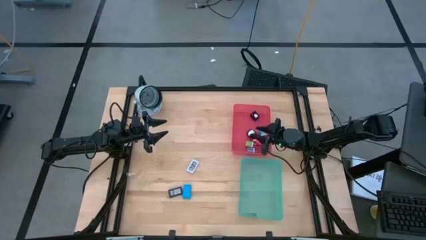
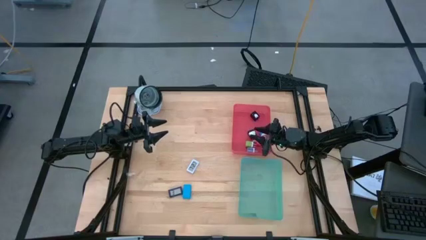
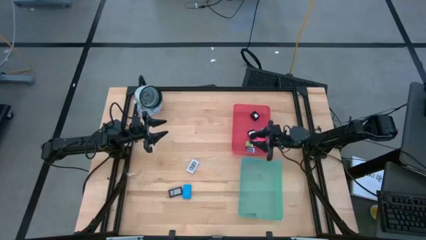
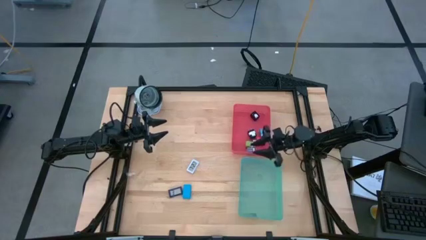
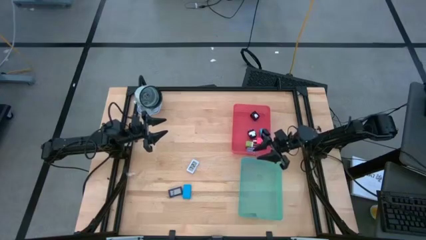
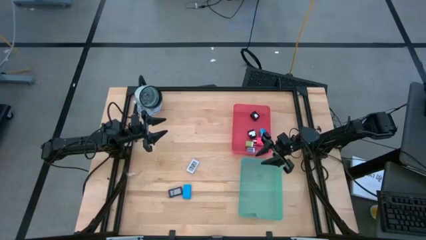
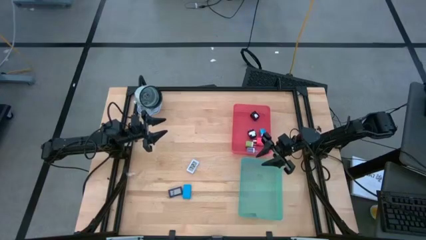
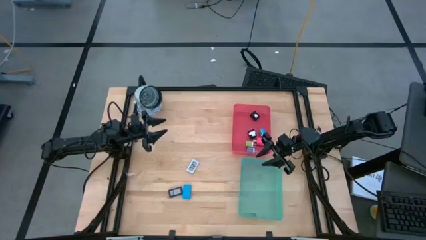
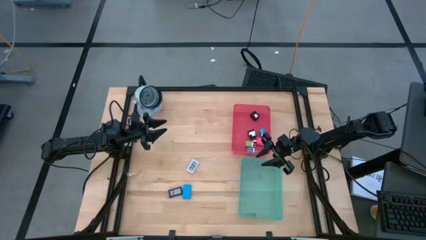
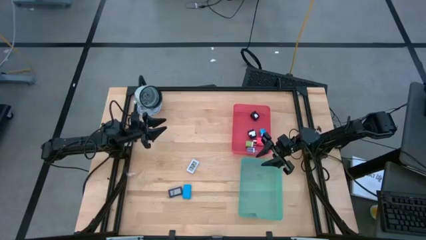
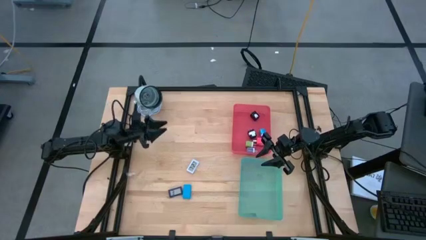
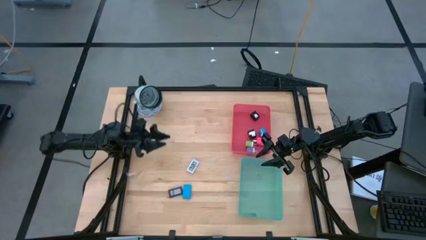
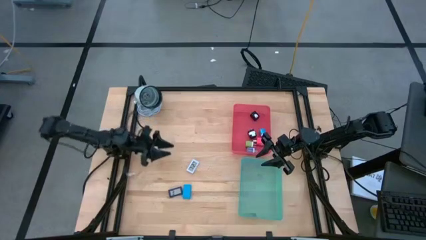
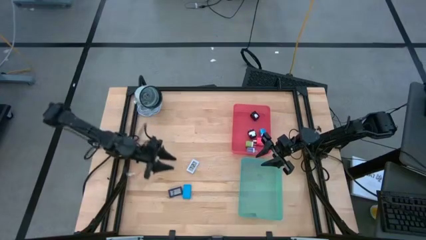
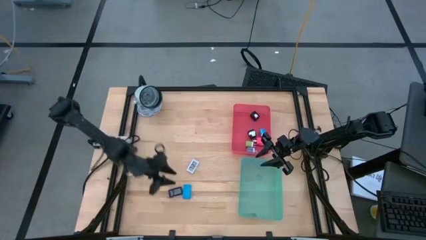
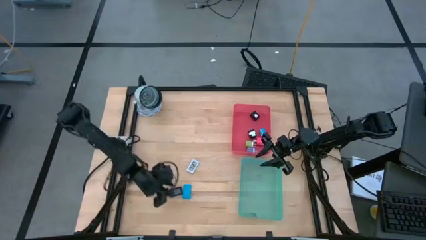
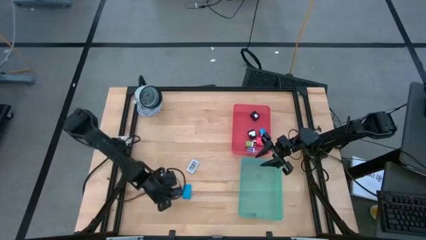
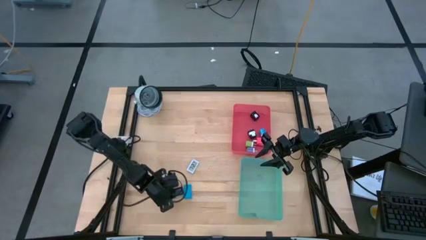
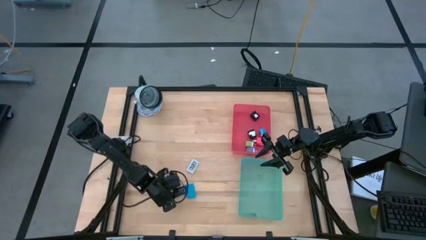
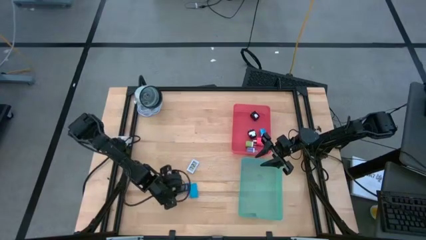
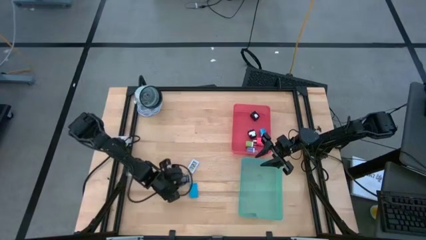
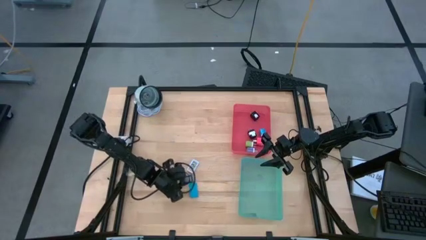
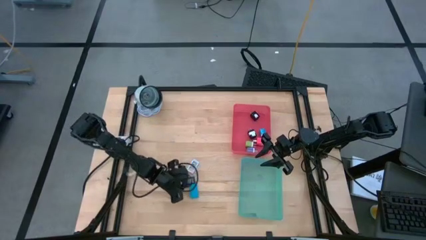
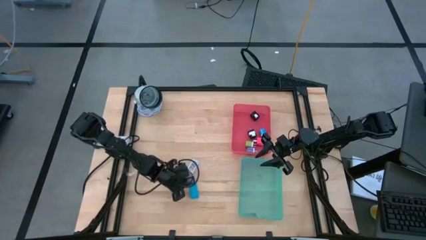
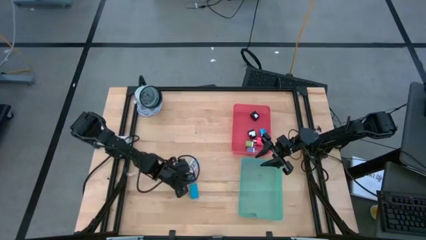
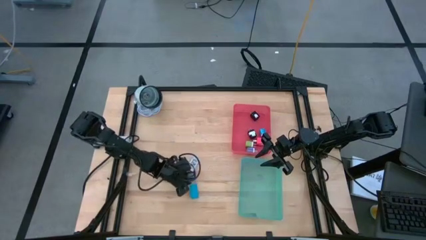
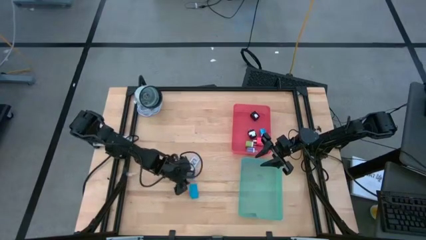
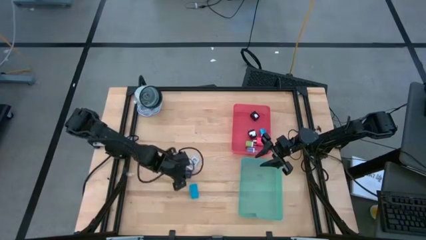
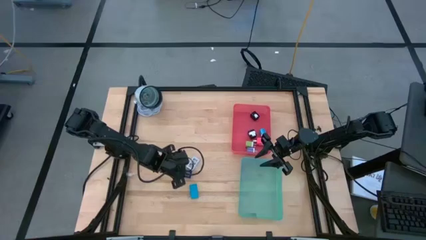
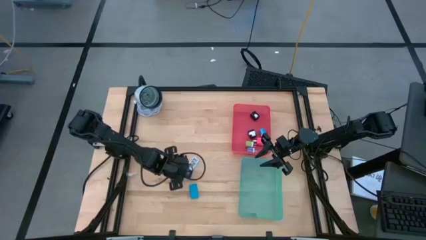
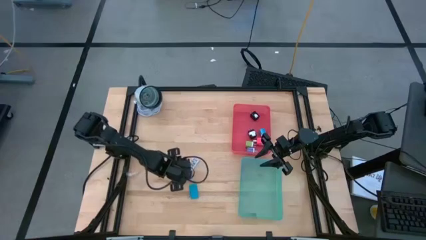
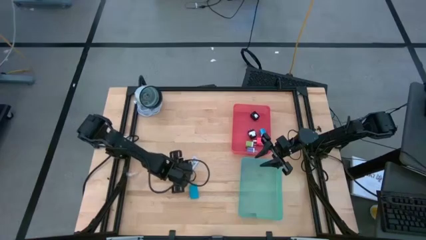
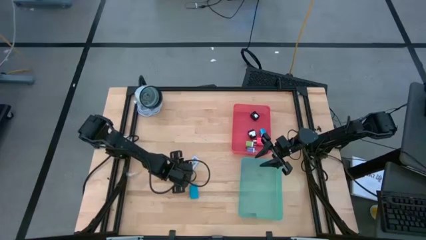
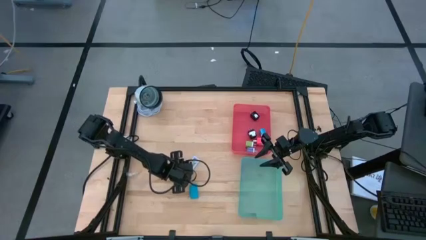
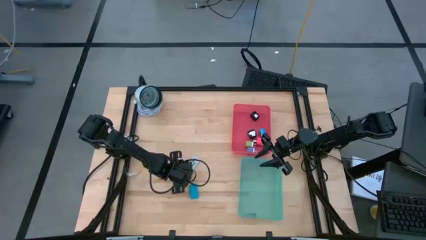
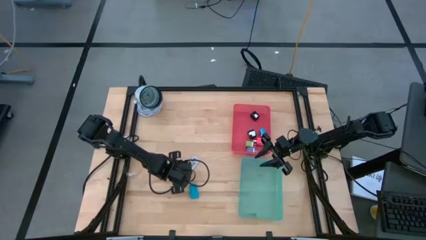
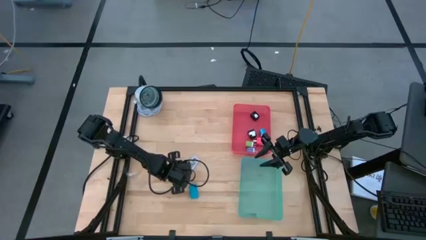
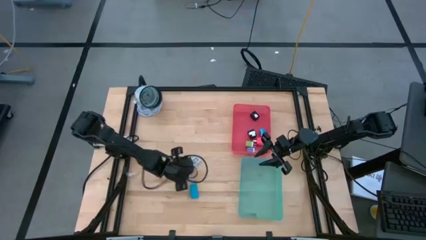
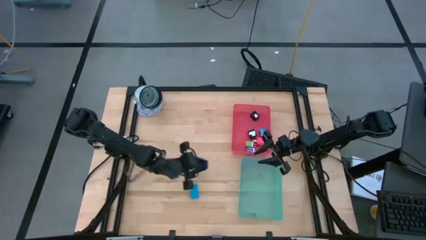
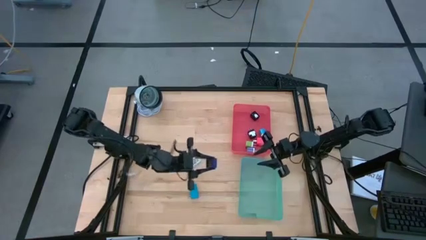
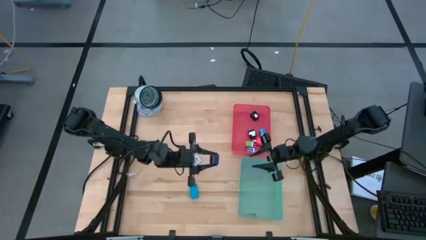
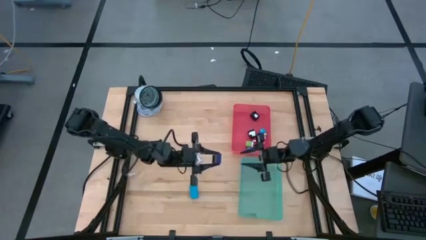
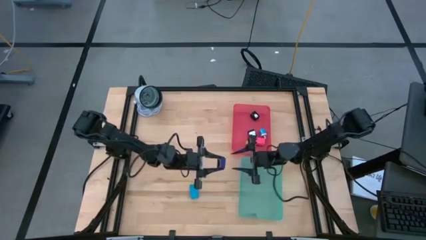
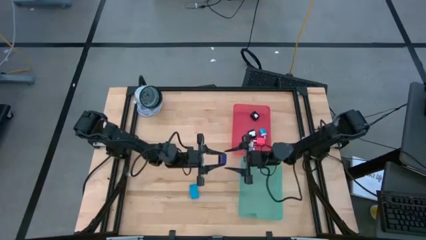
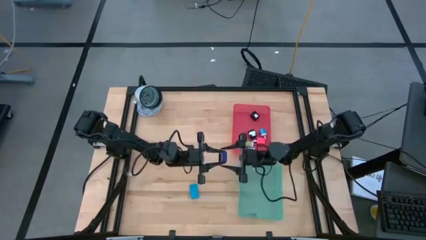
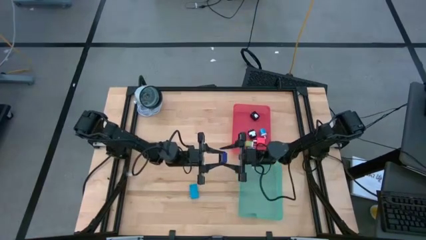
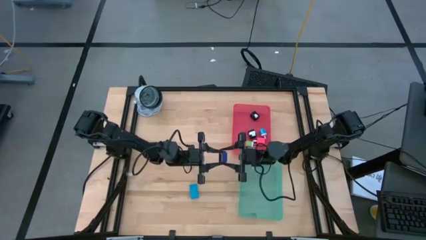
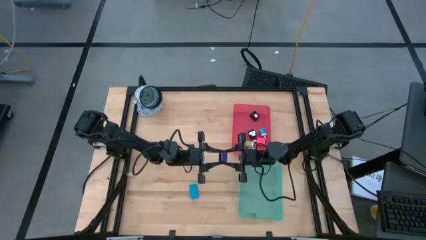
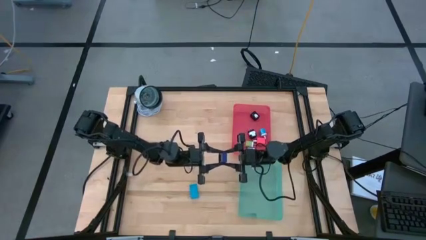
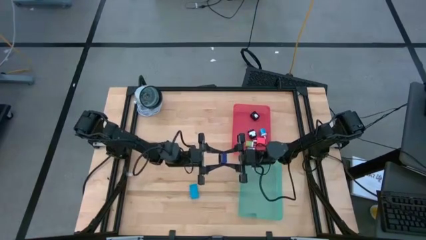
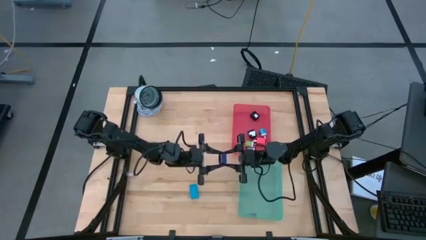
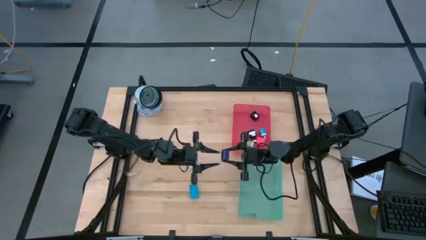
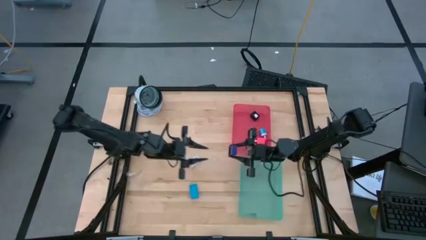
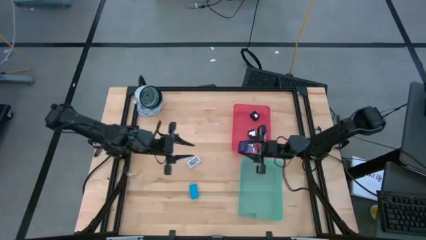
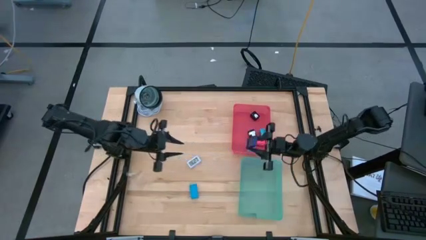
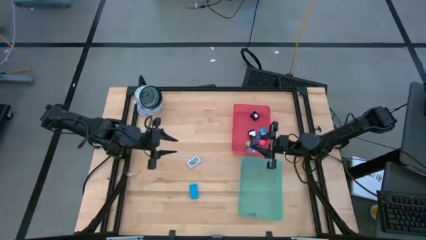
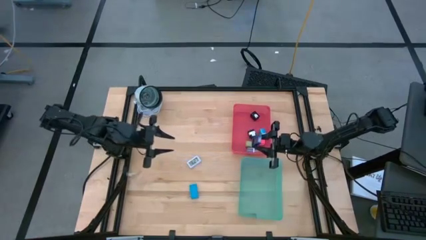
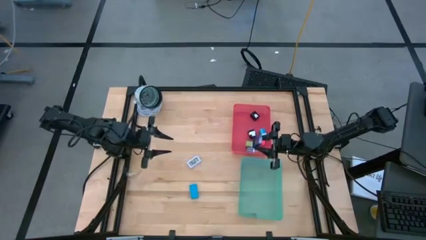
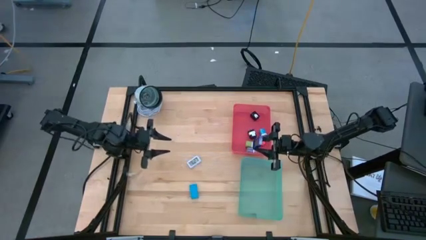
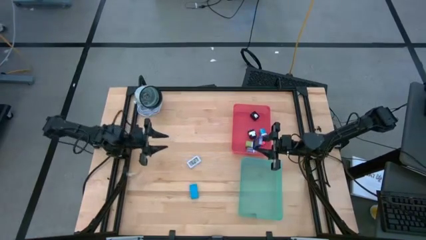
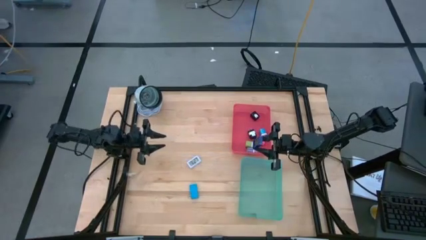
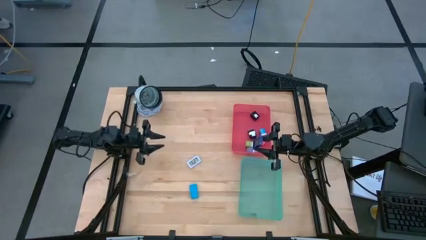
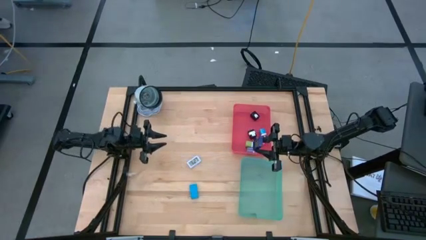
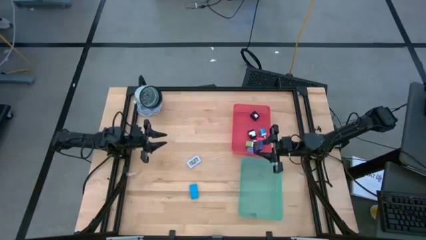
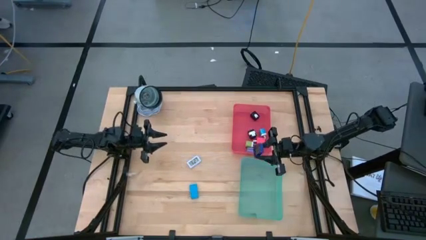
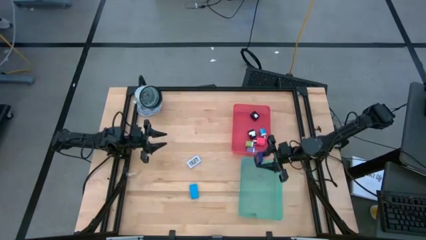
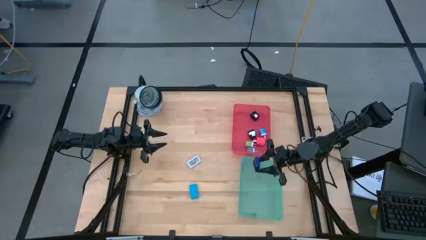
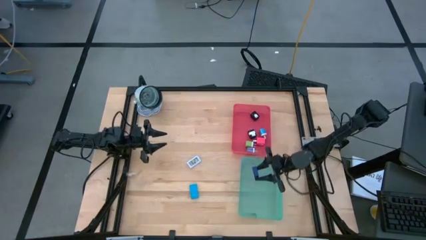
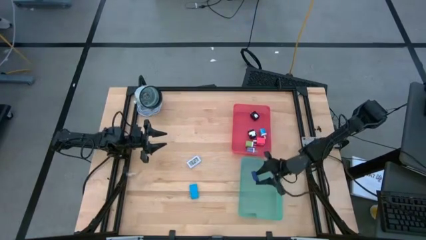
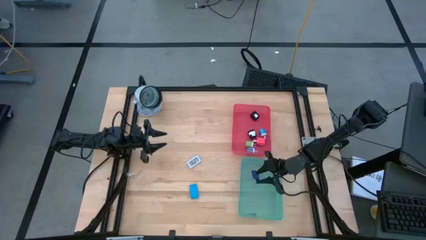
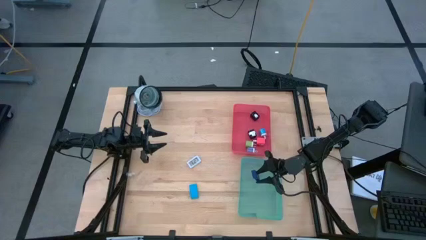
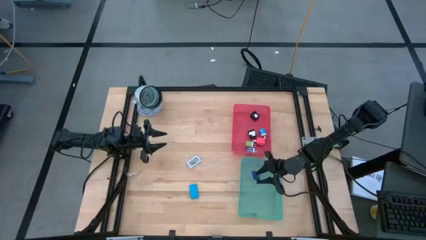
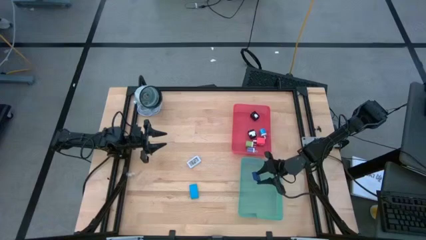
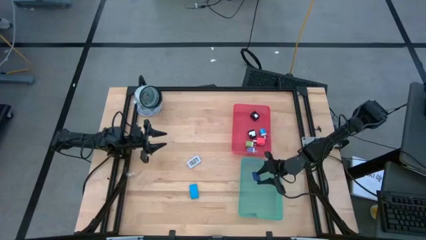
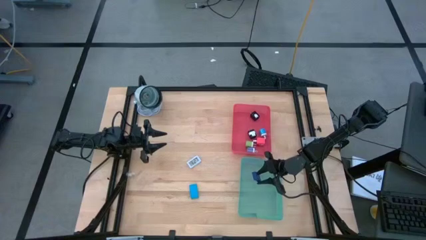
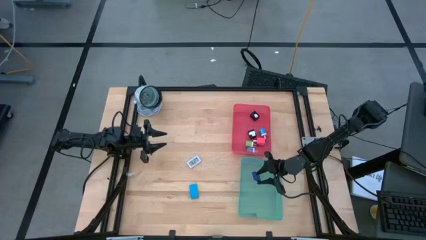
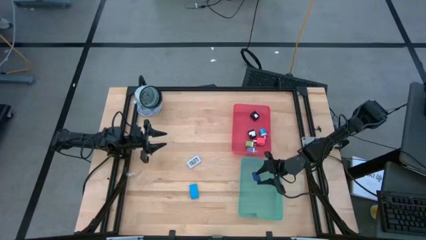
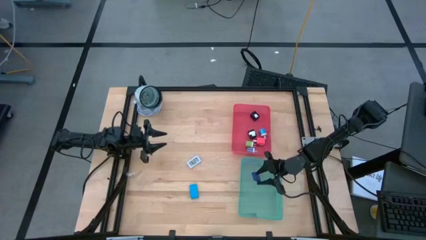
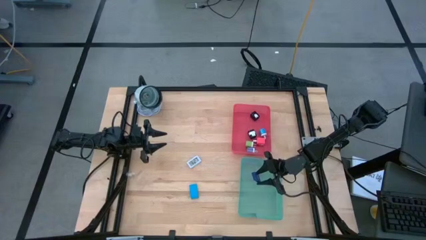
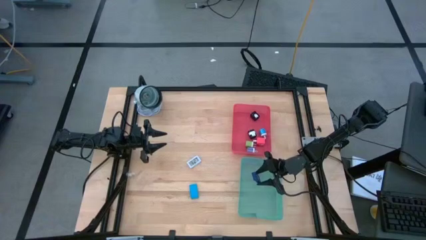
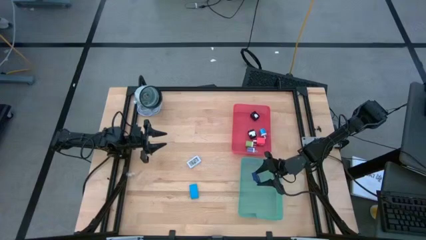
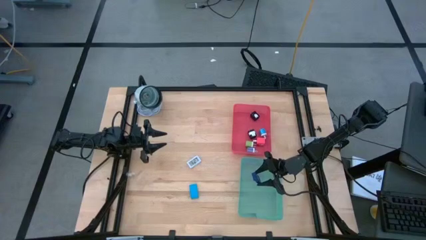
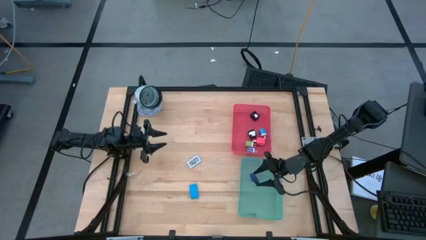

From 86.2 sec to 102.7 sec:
Task: Pick & Place Office items
Put the dark blue digital clock into the green bin
